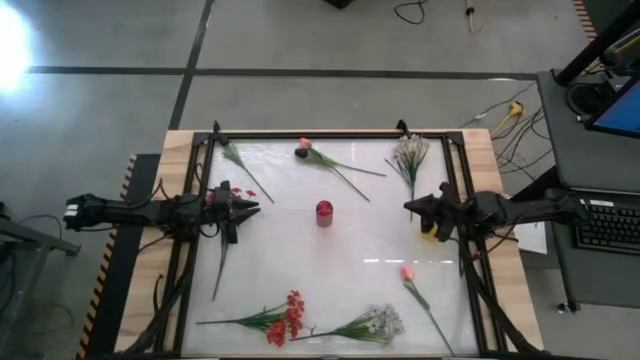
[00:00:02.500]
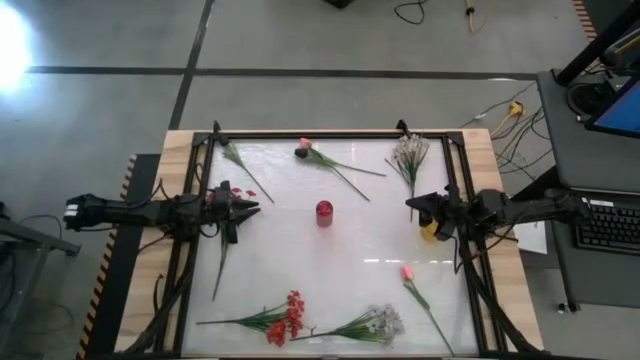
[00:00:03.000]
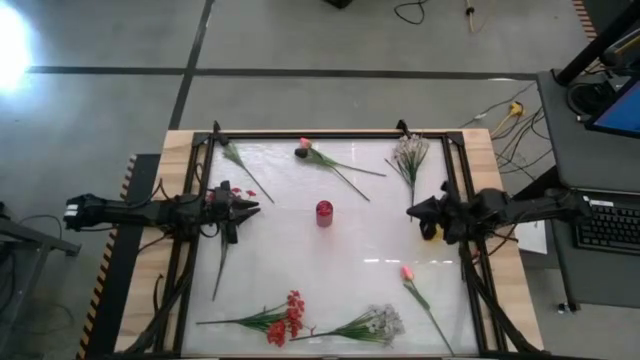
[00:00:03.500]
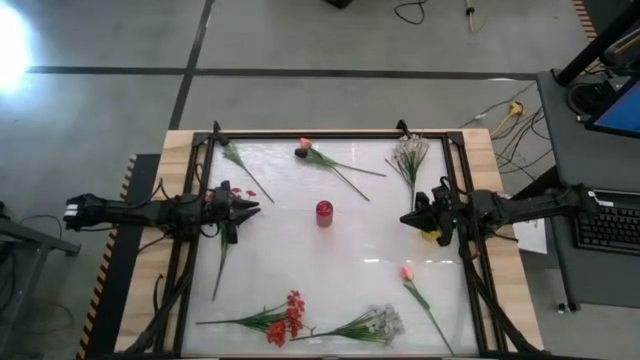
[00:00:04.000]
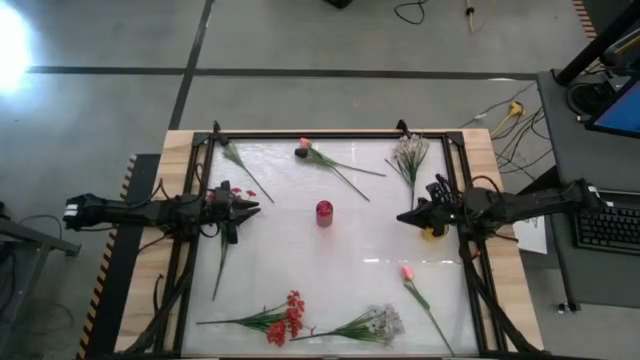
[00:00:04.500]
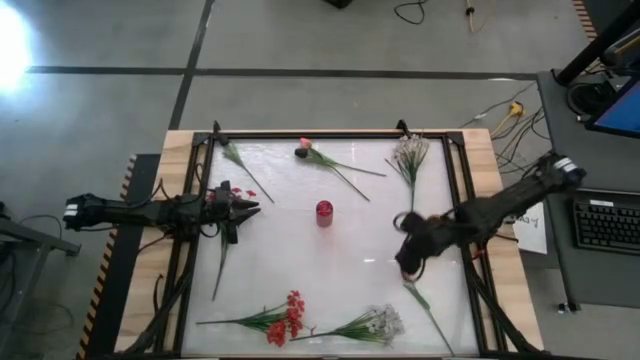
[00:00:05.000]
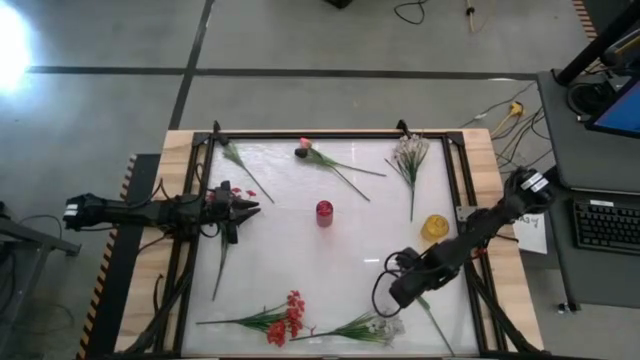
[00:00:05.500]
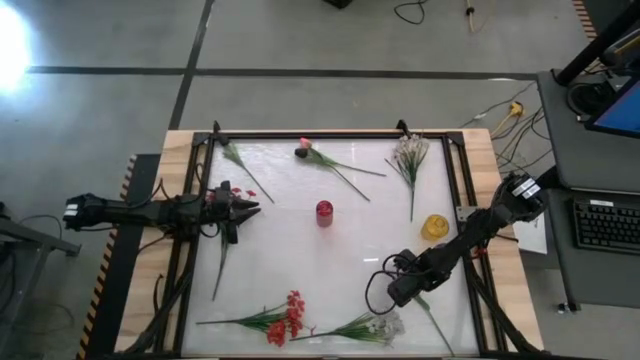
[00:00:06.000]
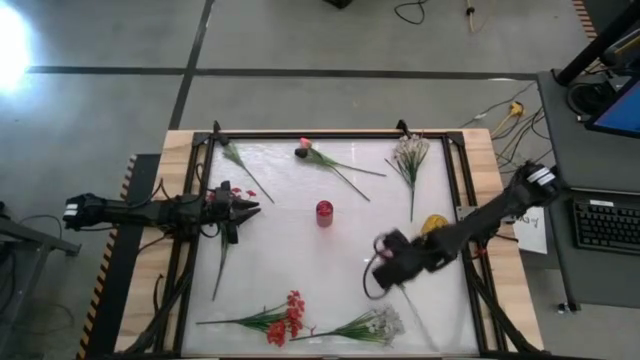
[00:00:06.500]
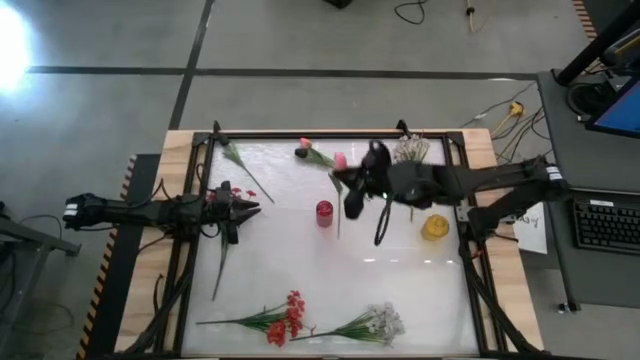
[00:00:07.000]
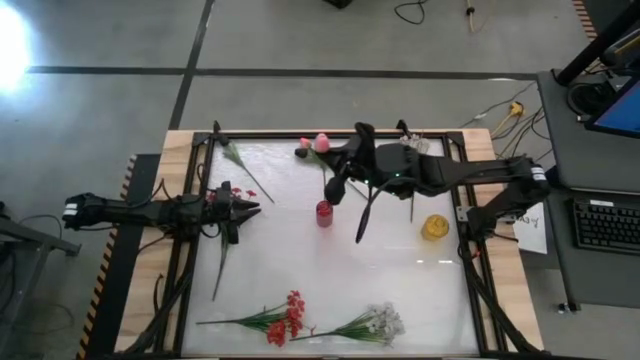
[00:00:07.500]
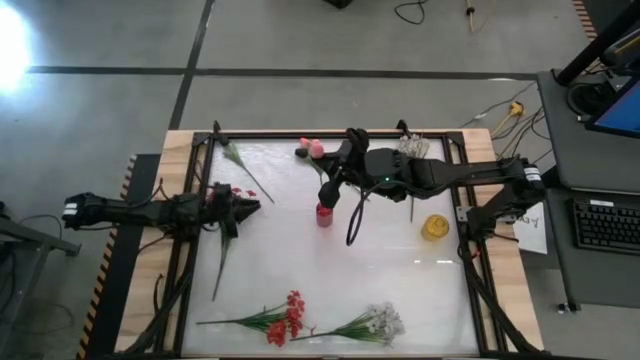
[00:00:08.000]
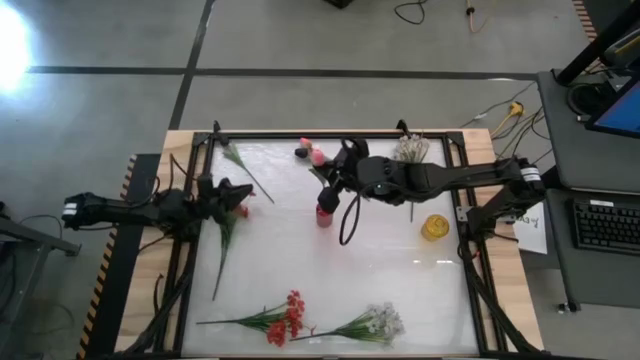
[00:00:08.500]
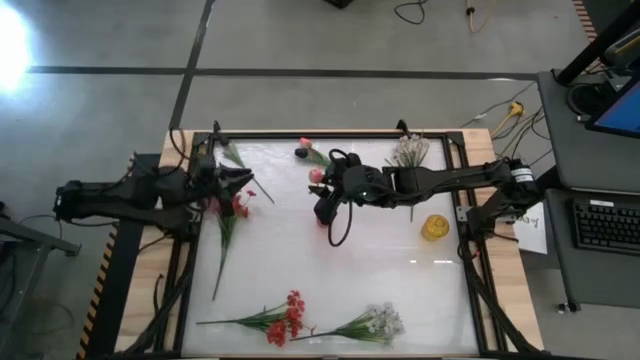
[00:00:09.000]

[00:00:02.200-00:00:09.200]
Task: Sort flowers into vase by color
Put the bottom pink flower into the red vase

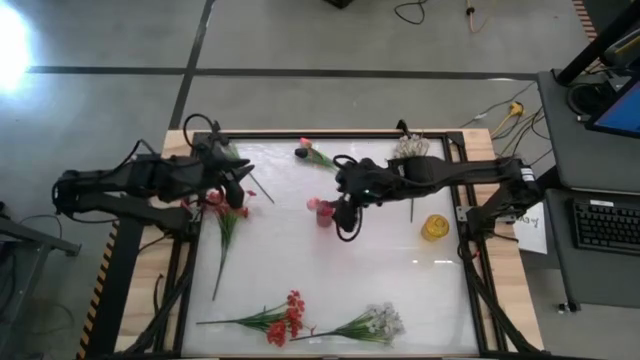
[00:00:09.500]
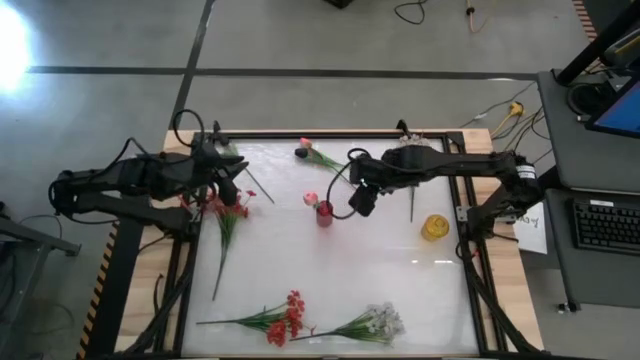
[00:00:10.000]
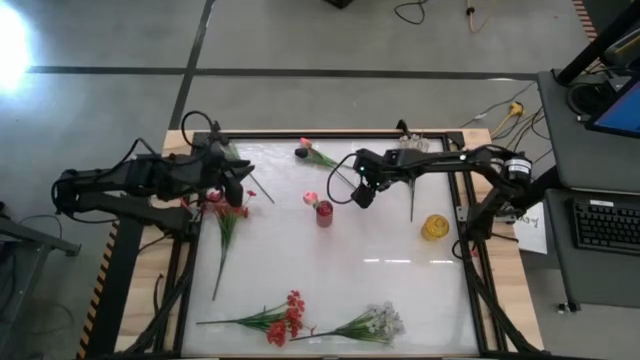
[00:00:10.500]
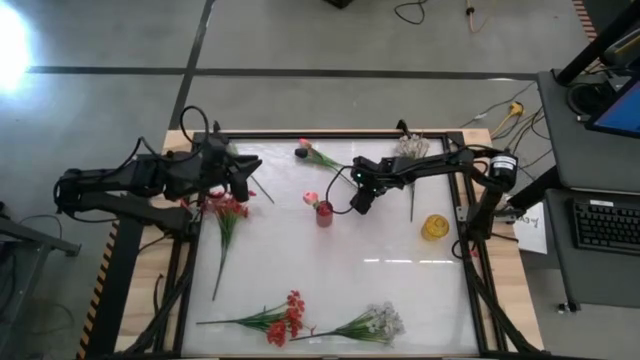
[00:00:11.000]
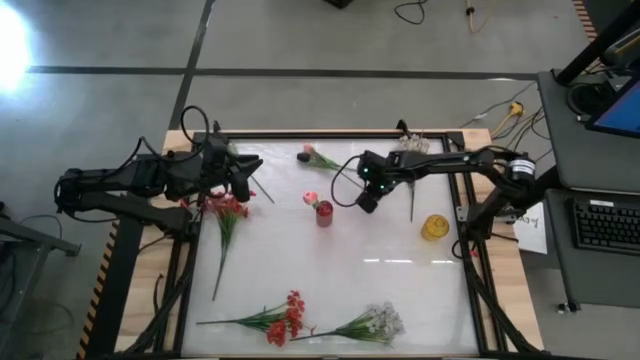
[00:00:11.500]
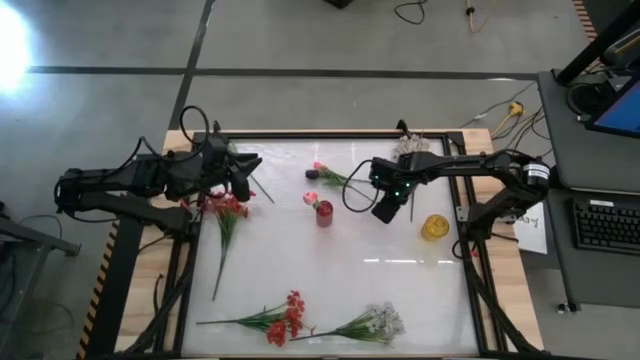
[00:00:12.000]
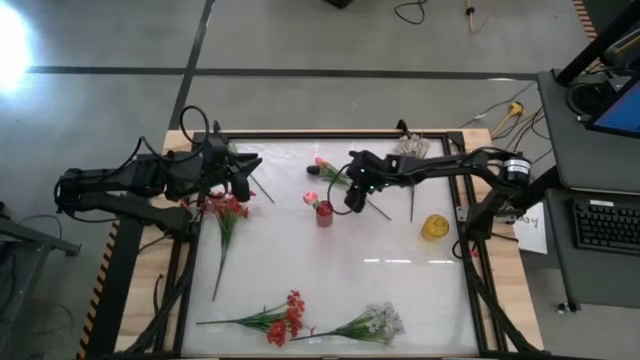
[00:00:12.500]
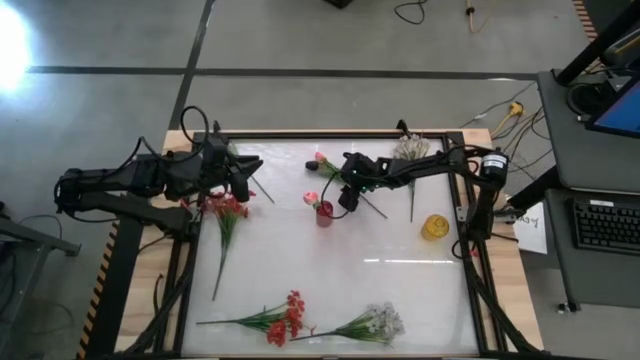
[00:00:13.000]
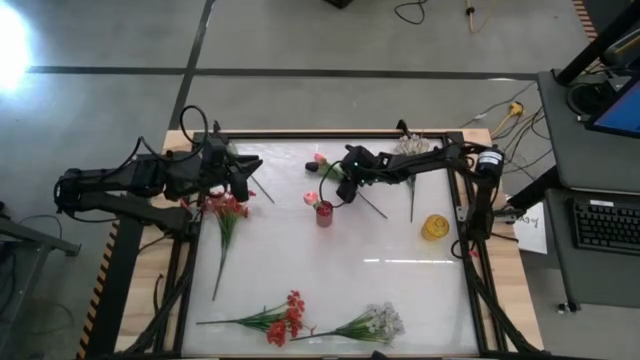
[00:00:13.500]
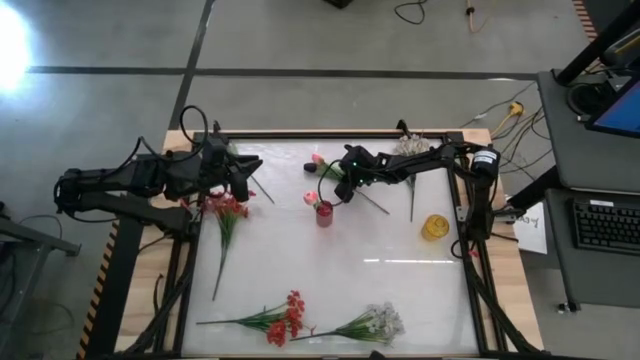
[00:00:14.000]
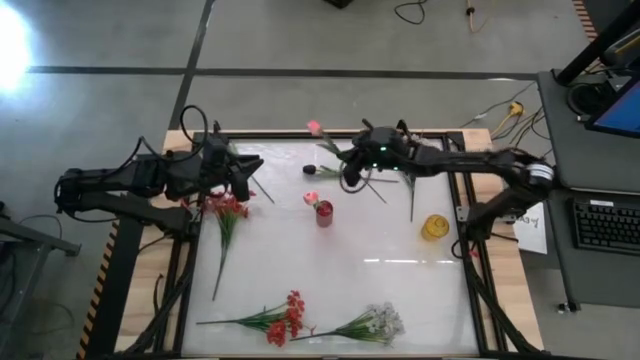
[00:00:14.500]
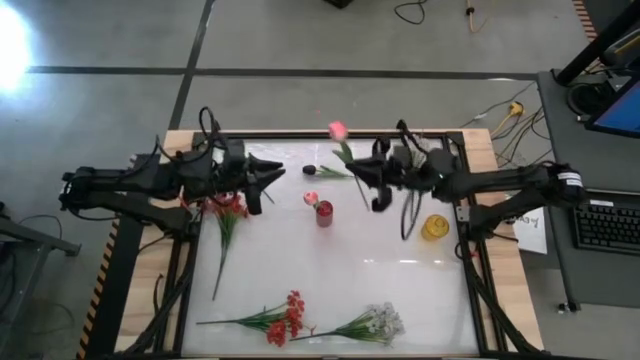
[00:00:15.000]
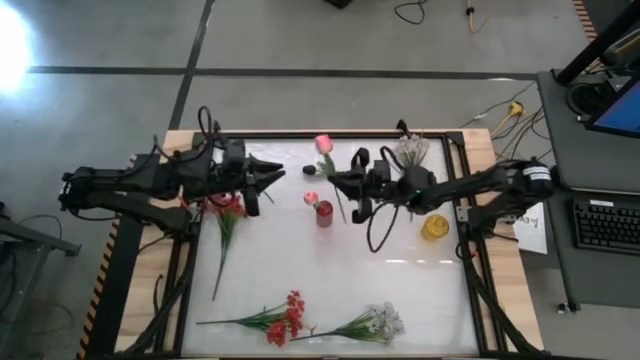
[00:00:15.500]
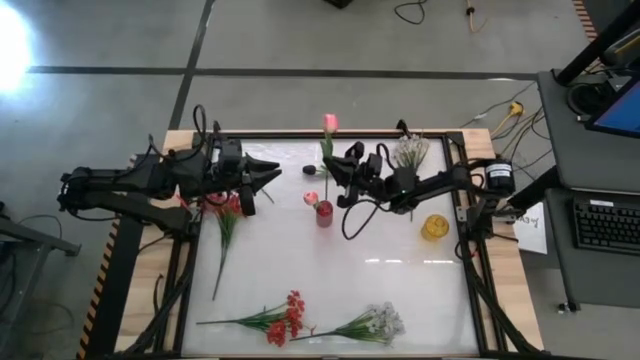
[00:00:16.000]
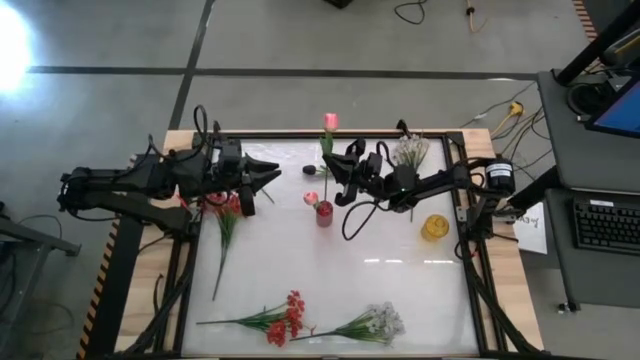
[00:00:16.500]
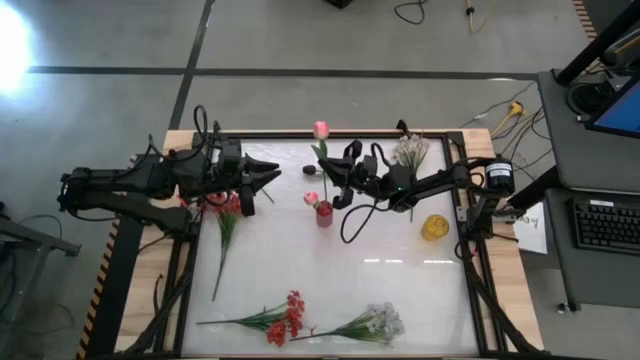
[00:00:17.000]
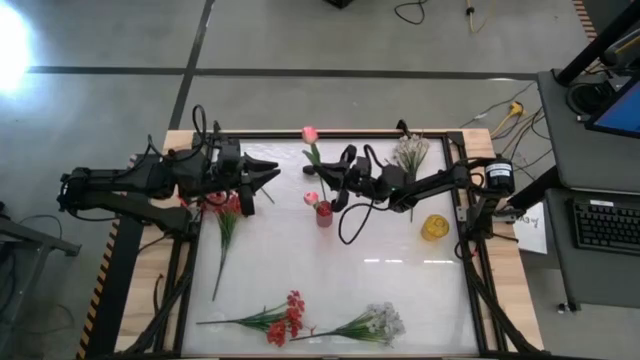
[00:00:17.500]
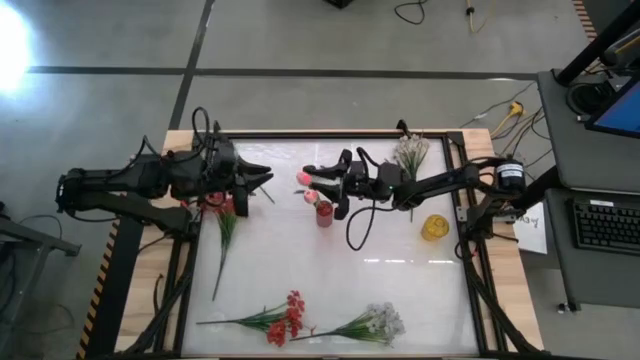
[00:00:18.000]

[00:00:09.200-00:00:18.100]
Put the pink flower into the red vase

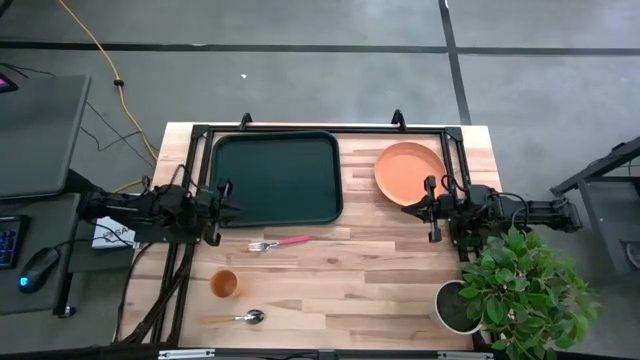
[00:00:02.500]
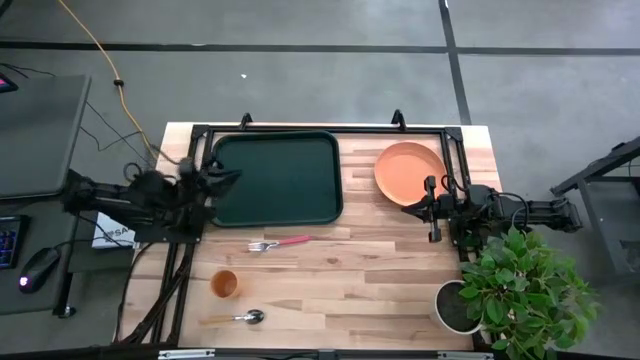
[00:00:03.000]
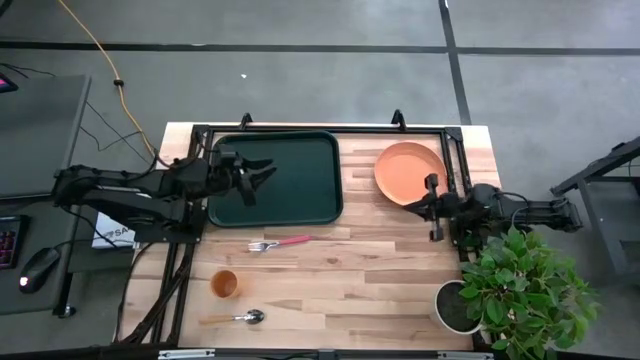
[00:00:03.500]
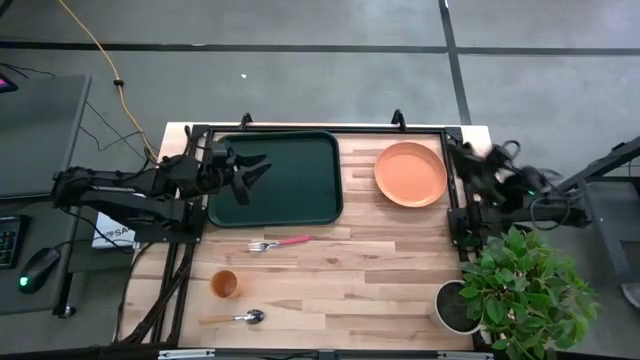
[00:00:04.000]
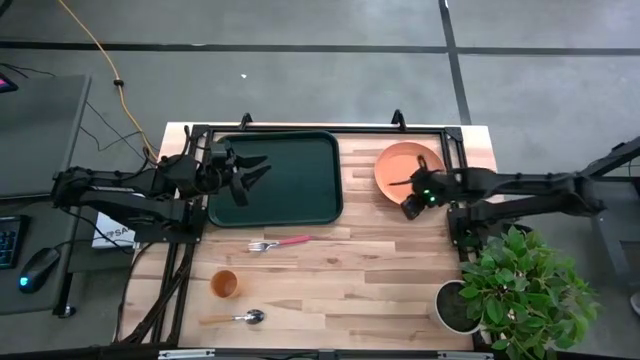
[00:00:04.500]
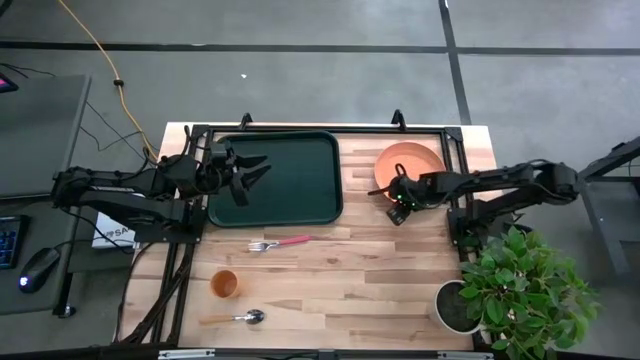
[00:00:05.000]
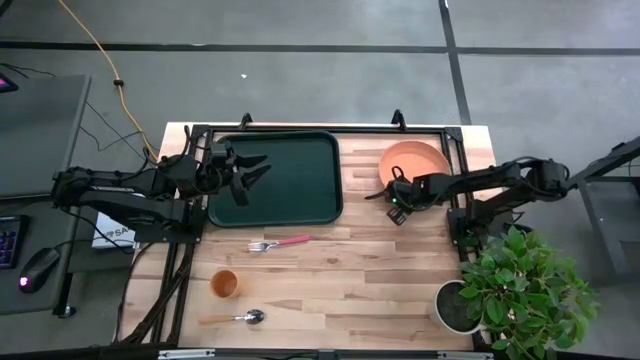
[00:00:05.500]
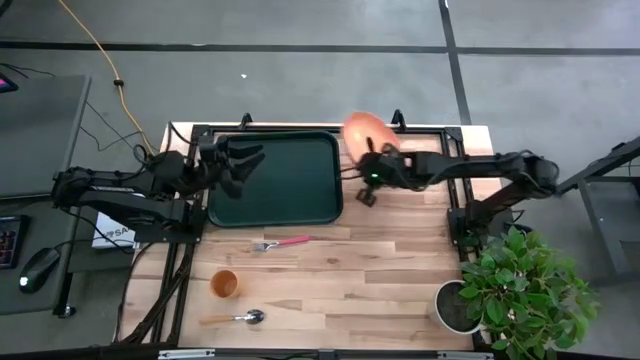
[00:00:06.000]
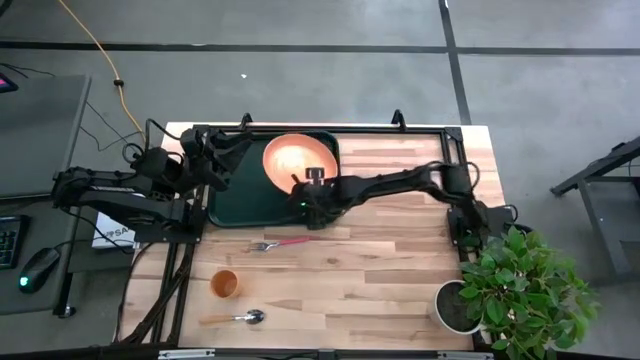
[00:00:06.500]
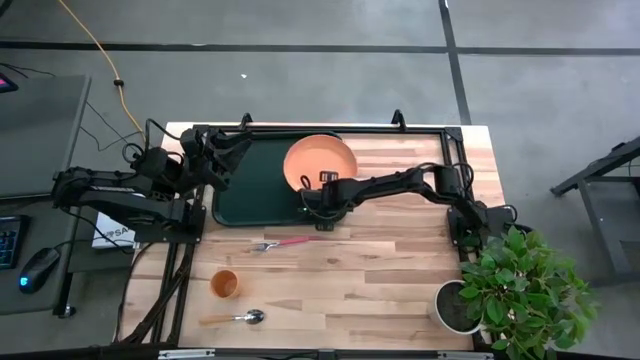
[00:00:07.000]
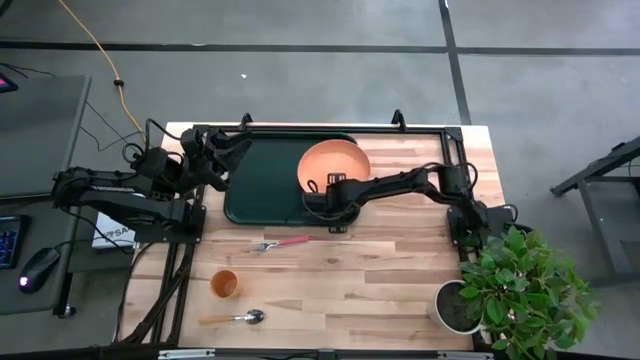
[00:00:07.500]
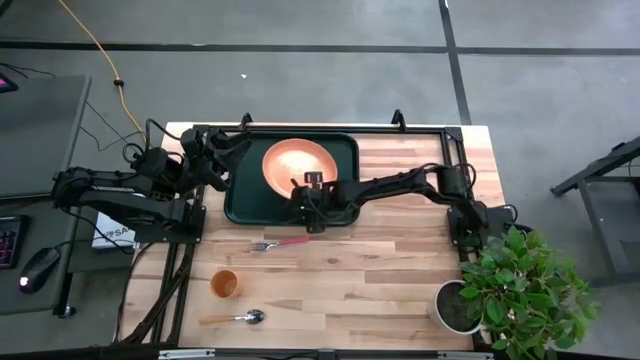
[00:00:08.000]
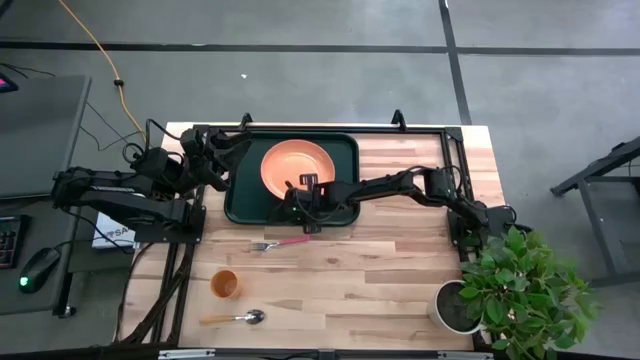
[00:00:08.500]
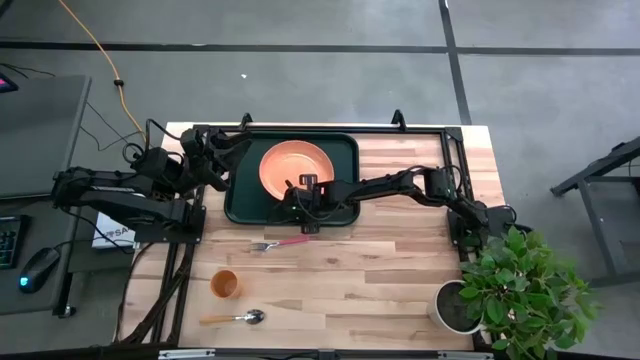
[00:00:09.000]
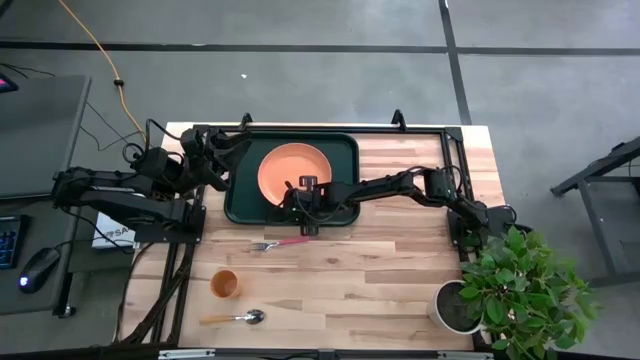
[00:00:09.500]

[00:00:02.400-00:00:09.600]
Task: Pick and place plate/cup/fork/spoon on tray
Put the orange plate on the black serving tray
